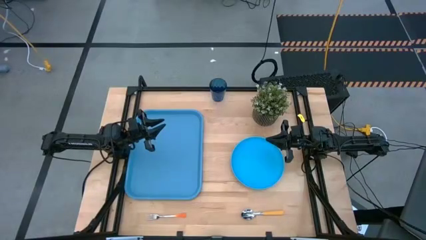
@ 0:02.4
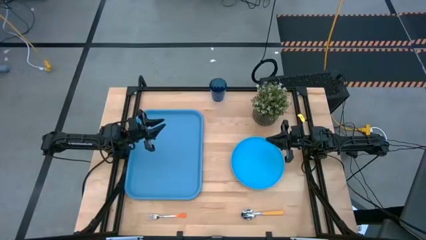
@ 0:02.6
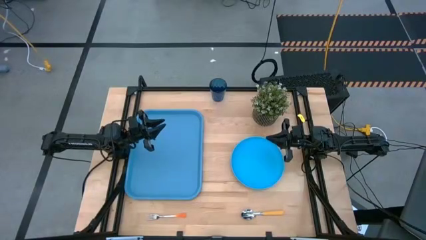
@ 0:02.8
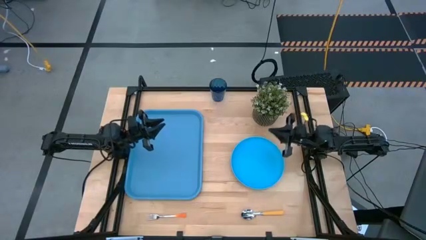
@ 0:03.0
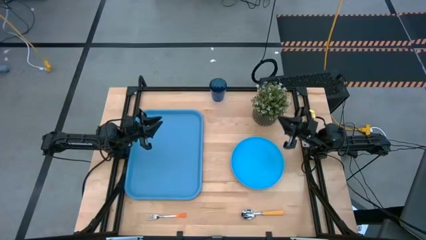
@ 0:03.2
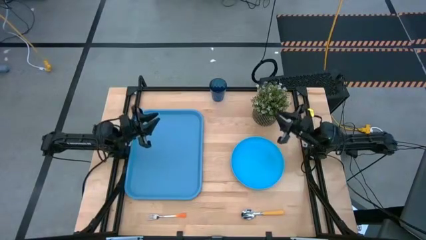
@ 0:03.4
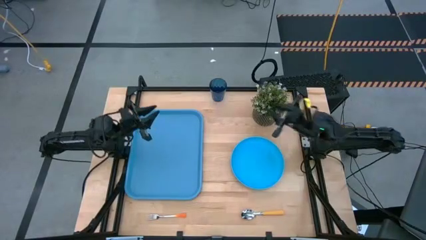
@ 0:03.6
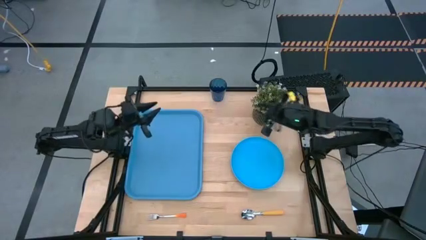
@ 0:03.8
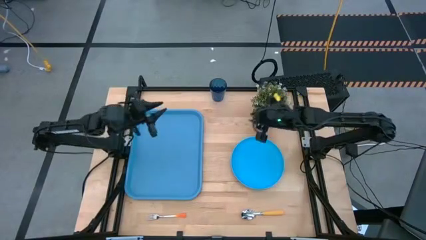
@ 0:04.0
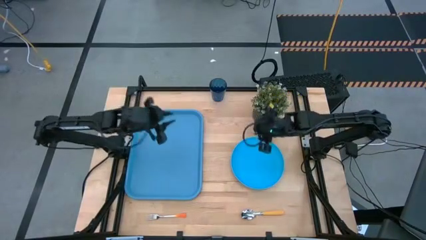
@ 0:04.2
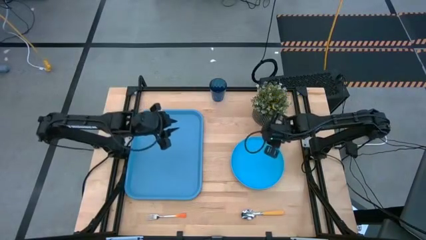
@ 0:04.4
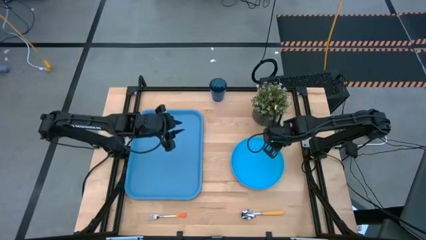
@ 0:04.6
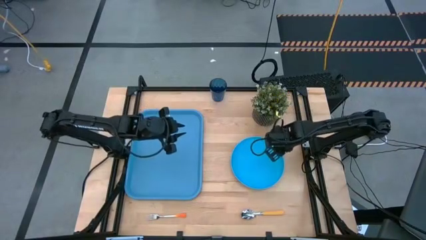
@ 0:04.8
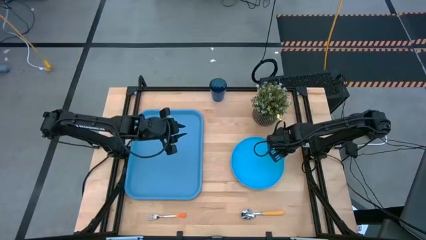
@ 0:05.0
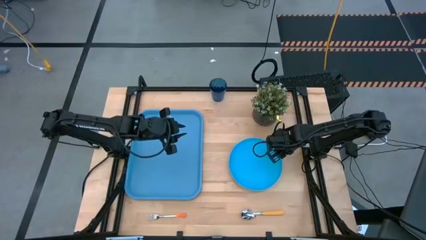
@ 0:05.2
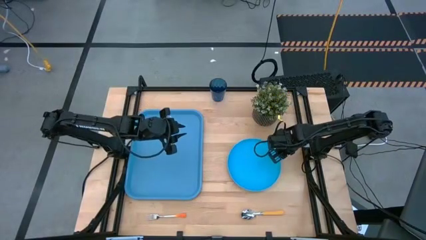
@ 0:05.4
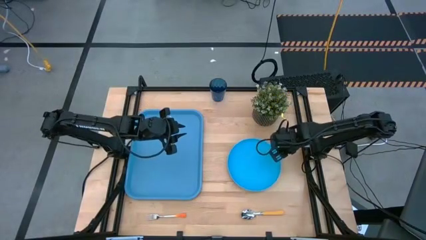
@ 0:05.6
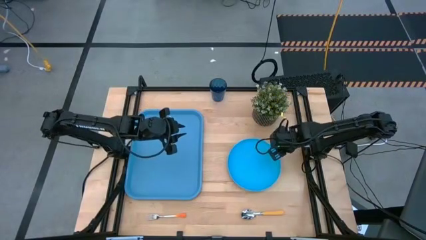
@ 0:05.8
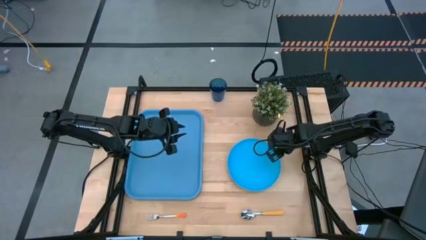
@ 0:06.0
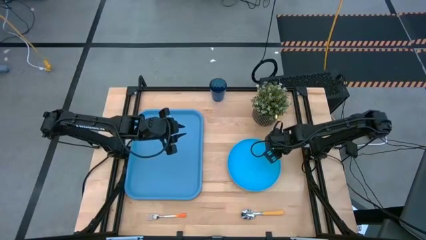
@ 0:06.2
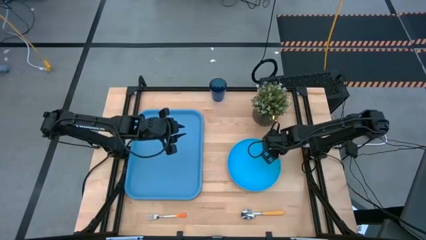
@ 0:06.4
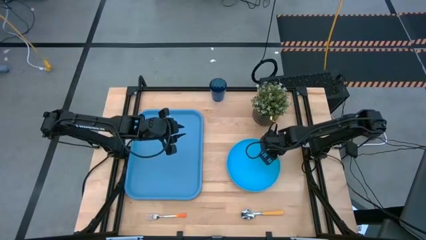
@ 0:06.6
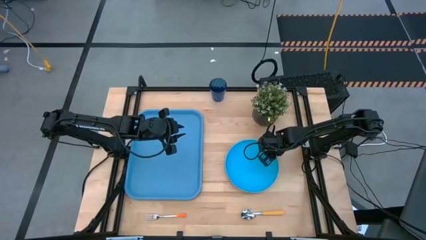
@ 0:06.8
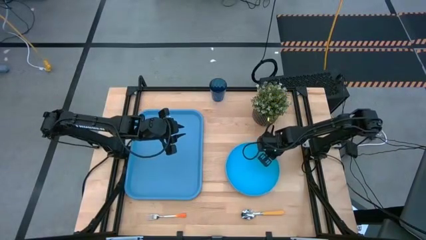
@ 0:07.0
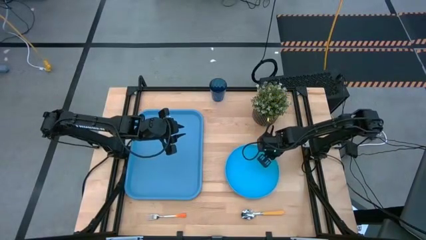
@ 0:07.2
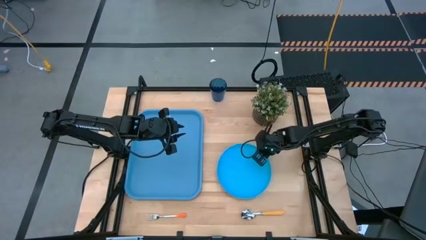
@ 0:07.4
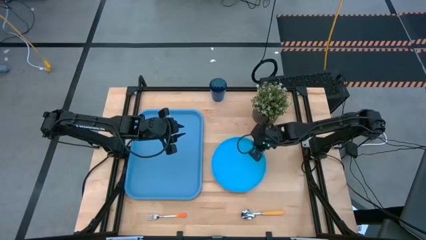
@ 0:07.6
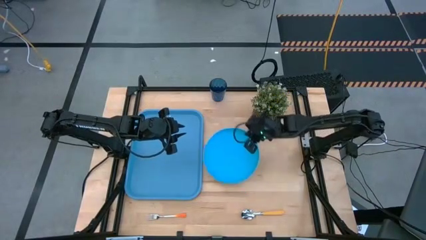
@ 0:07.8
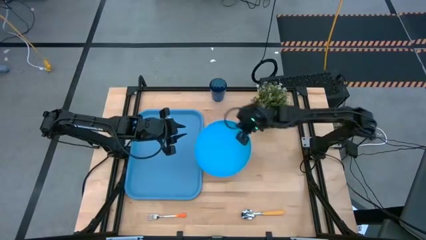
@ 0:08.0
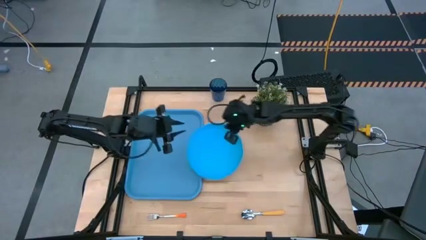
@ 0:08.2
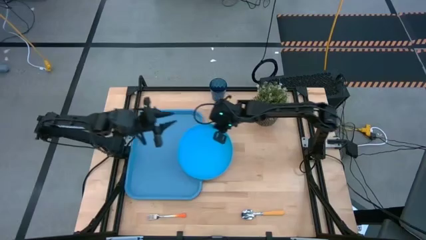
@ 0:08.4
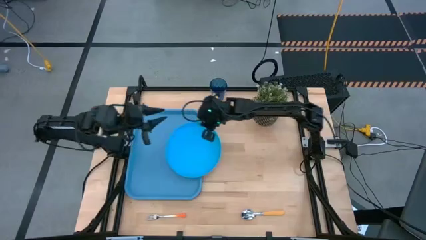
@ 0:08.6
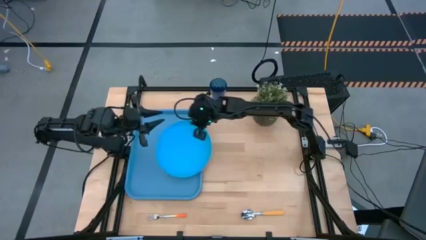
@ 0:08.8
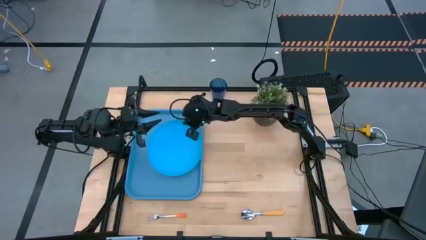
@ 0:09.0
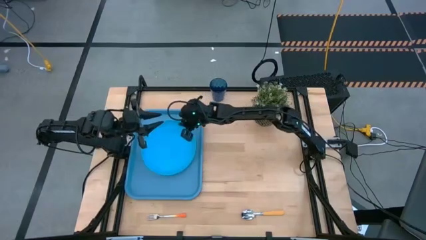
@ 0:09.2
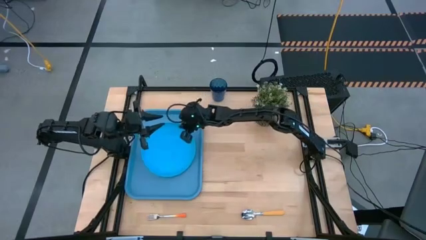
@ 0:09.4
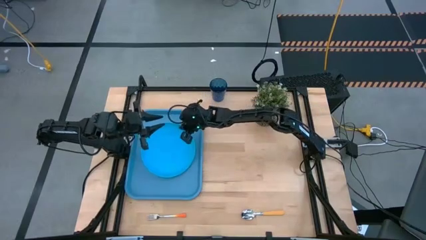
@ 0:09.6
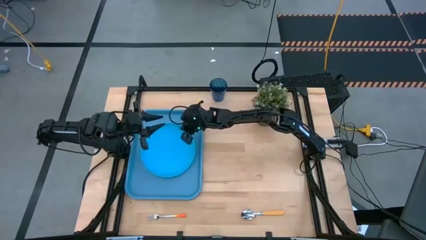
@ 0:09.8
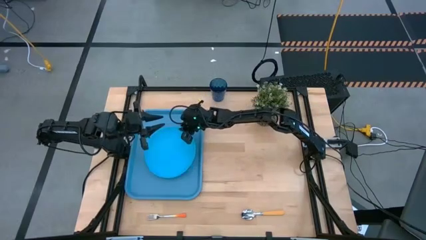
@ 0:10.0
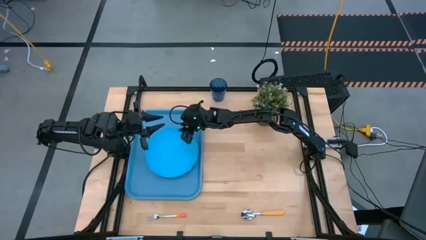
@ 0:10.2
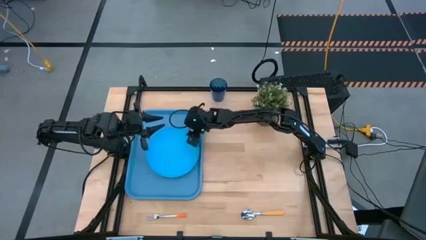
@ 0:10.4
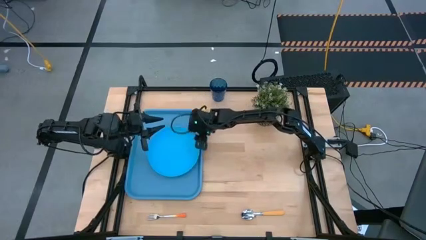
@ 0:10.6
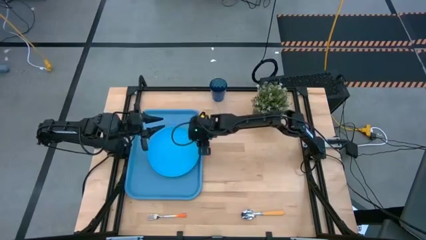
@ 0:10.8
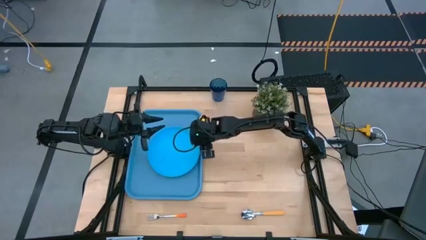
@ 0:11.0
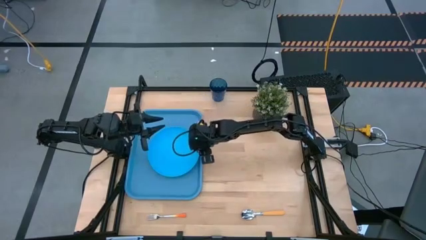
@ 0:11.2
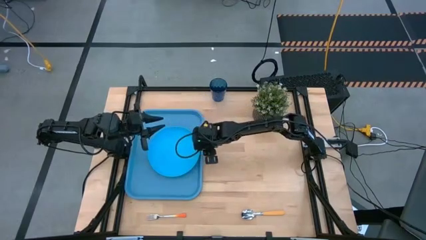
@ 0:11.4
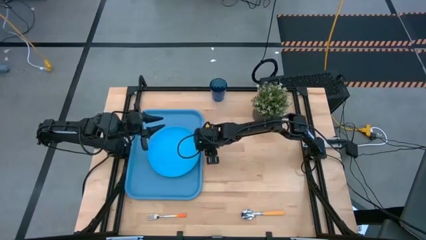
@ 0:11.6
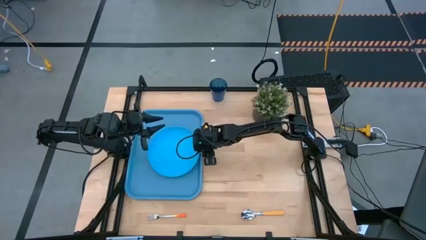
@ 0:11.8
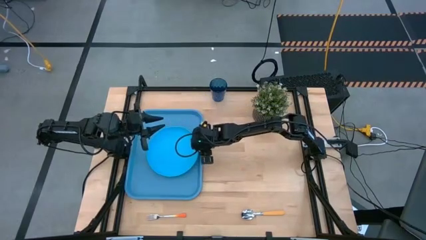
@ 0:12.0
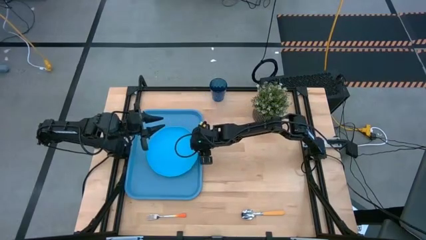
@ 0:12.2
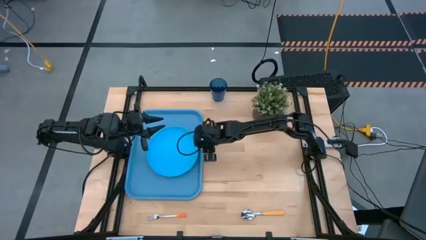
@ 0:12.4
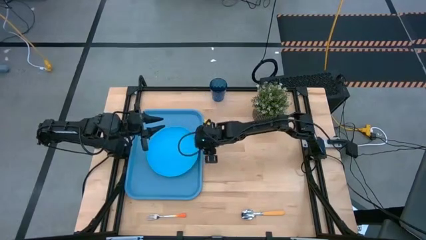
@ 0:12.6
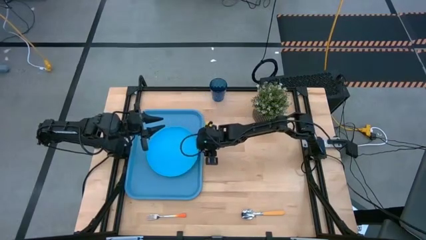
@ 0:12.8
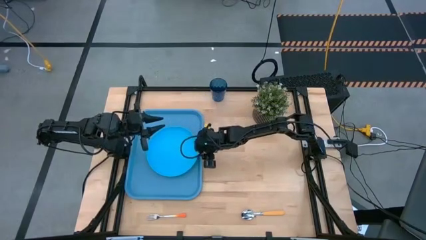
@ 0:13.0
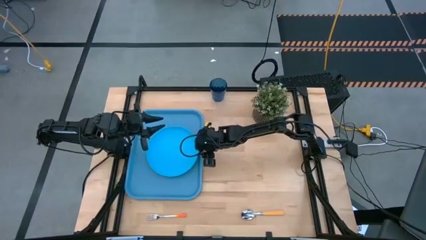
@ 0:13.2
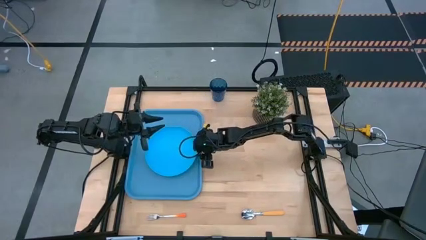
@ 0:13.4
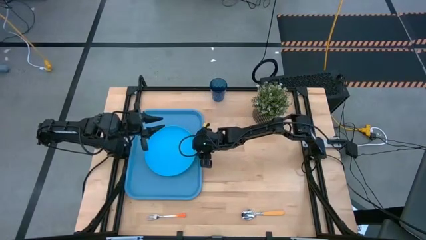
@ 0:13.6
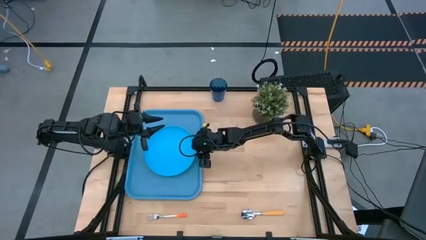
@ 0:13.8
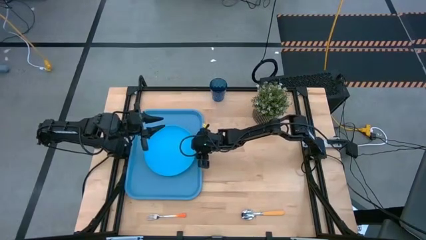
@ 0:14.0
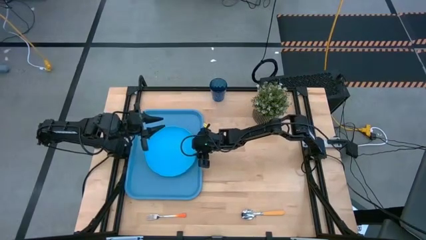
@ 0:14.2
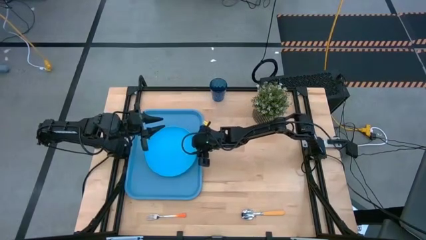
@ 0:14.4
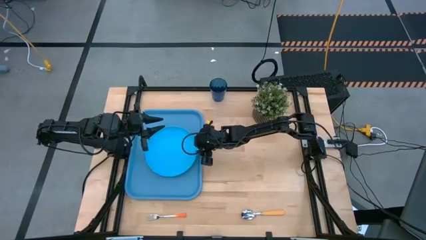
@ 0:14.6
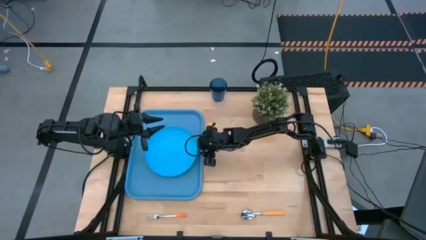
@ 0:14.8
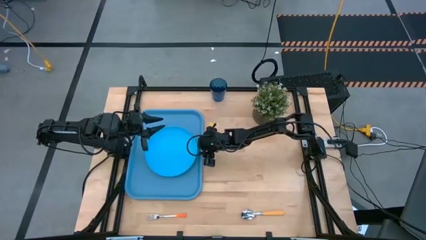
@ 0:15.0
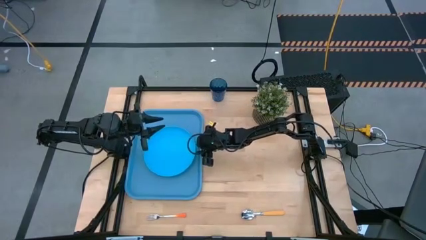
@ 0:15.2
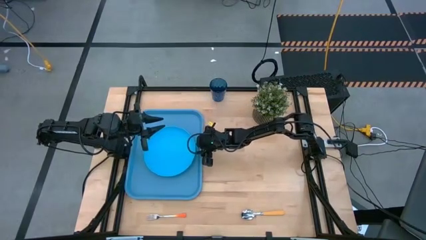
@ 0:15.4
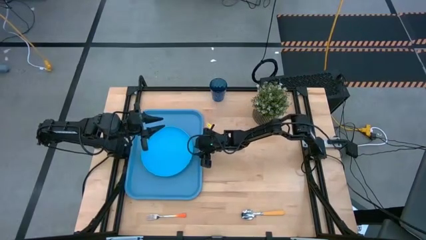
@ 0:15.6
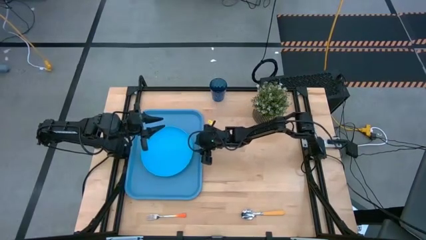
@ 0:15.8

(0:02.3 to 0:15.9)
Task: Pick and place plate/cup/fork/spoon on tray
Put the blue plate on the blue tray
